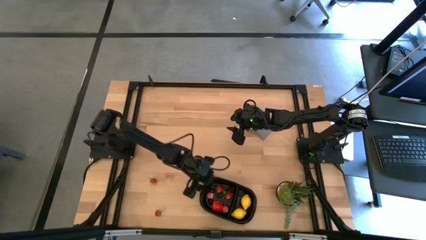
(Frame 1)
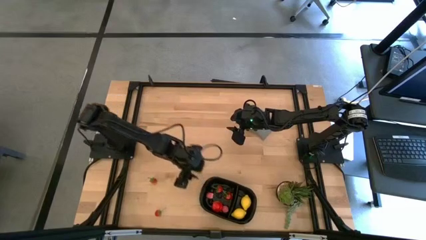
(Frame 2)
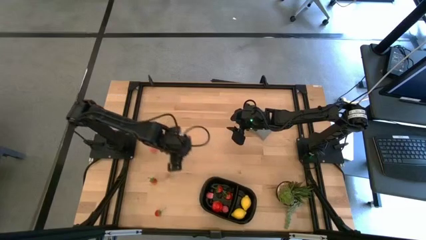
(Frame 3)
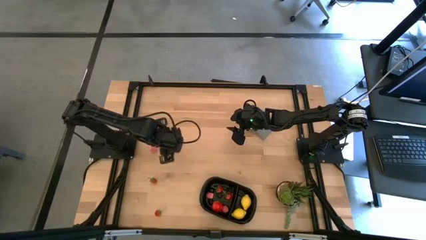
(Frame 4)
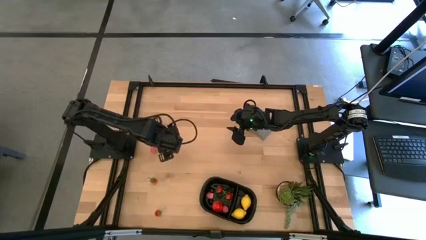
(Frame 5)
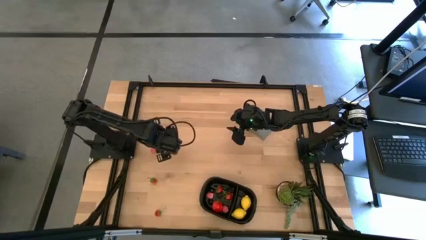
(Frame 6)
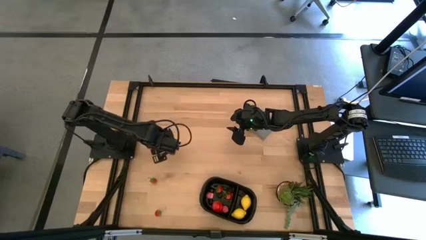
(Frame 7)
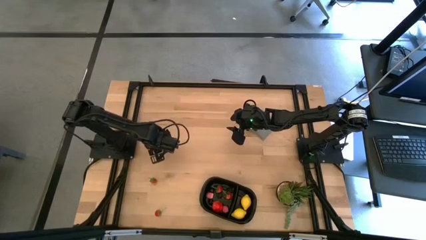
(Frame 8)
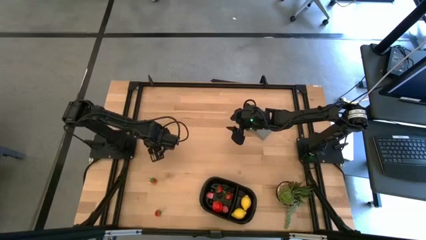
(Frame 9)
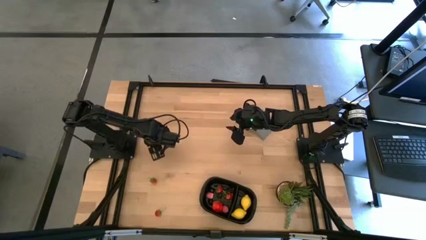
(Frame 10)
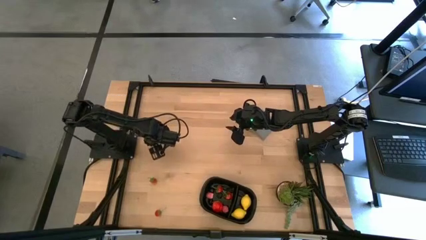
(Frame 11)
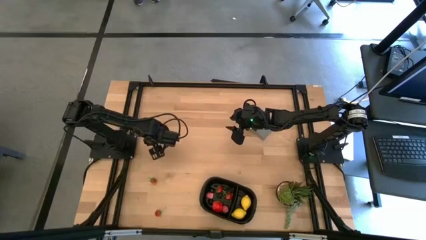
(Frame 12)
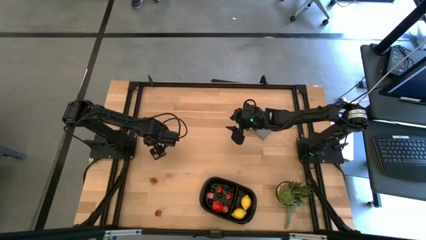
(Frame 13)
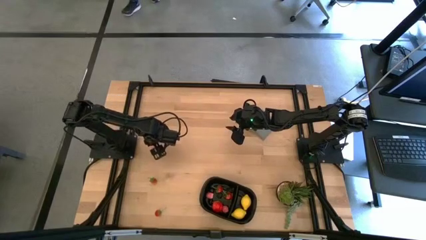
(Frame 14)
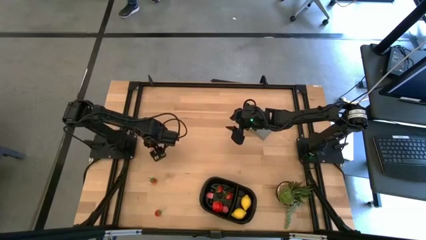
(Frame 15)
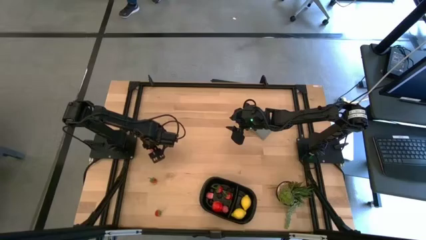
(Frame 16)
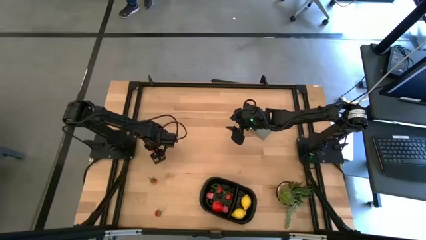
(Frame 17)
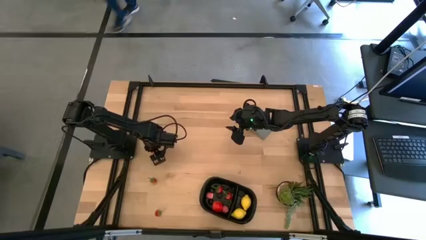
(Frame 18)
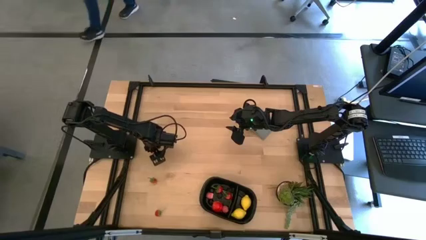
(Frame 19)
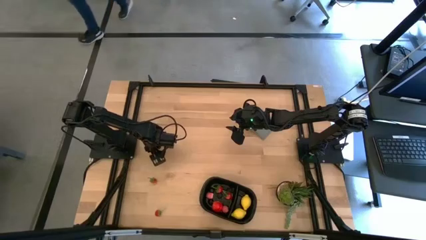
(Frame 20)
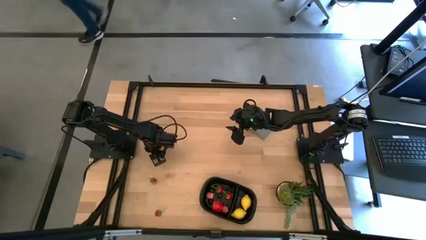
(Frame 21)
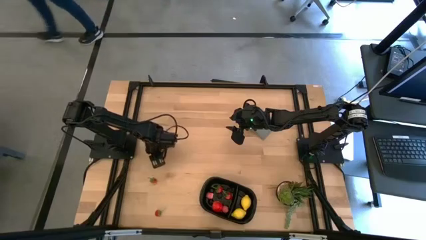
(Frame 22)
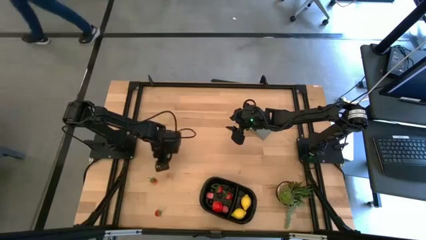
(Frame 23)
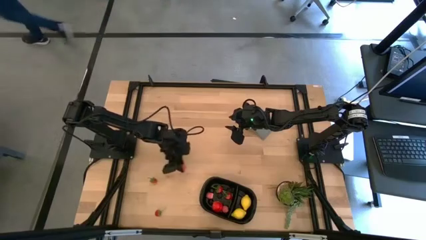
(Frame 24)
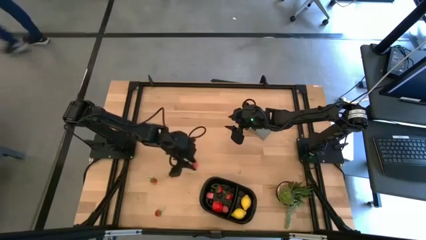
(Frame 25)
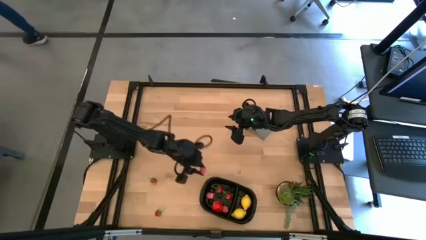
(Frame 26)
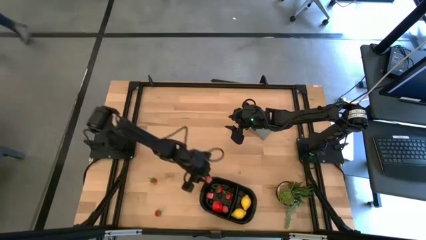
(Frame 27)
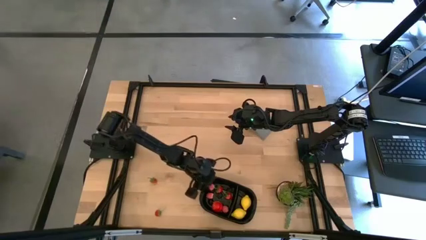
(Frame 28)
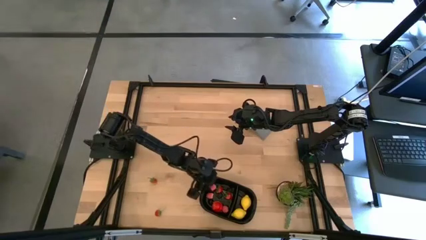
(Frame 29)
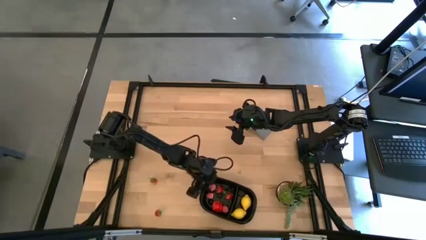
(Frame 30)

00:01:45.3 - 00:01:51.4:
Task: Pick and placing Produce into tupperware
Put the peach into the black bin

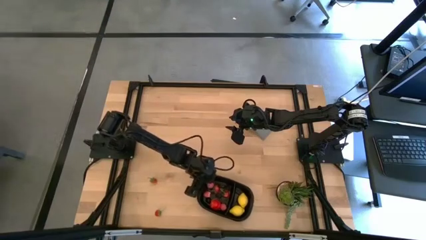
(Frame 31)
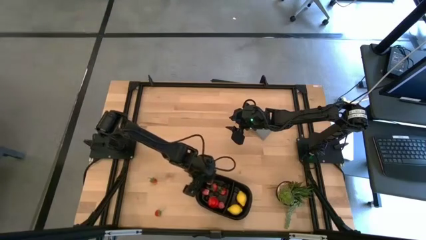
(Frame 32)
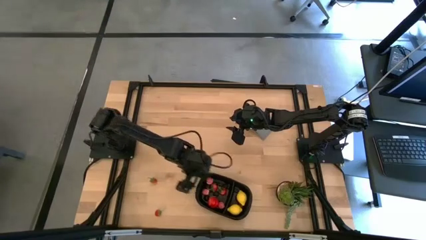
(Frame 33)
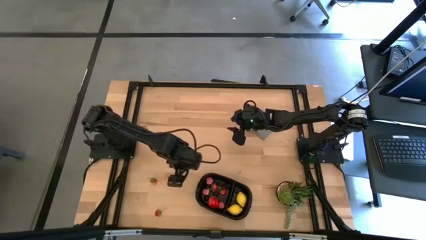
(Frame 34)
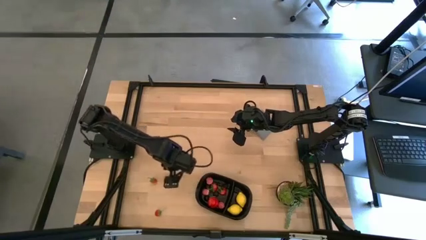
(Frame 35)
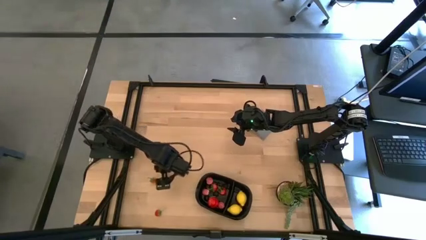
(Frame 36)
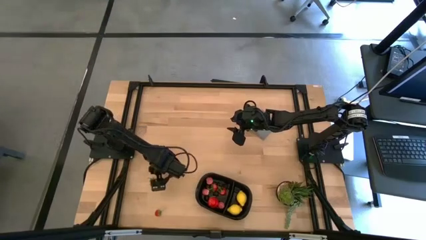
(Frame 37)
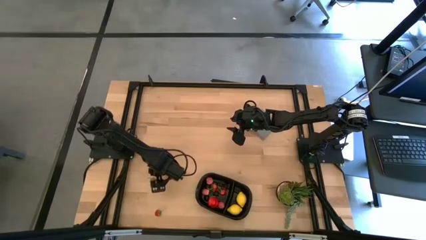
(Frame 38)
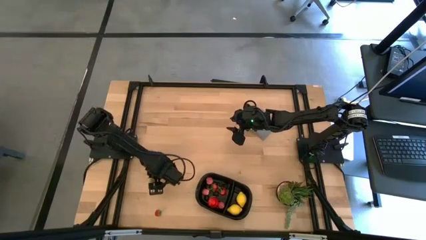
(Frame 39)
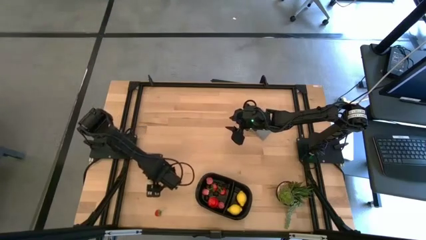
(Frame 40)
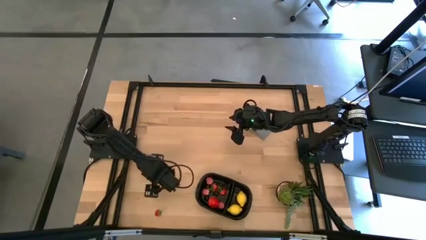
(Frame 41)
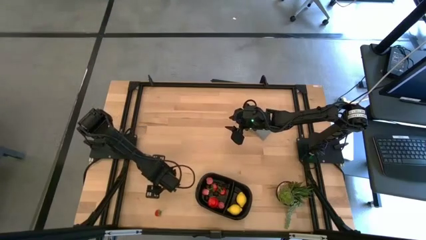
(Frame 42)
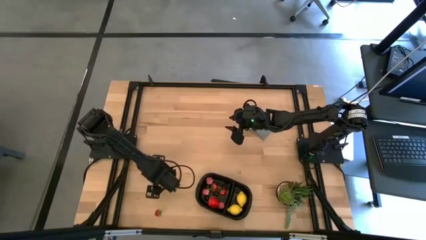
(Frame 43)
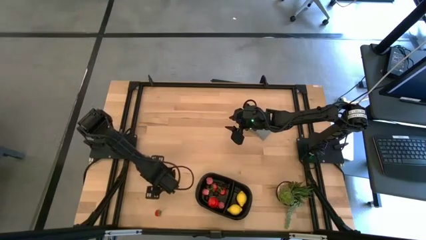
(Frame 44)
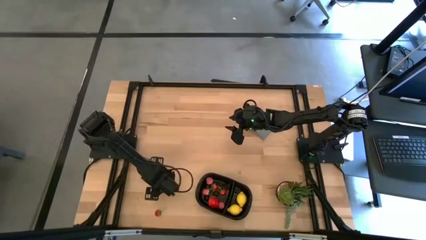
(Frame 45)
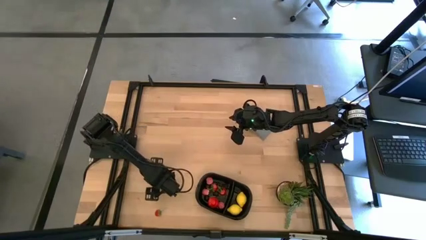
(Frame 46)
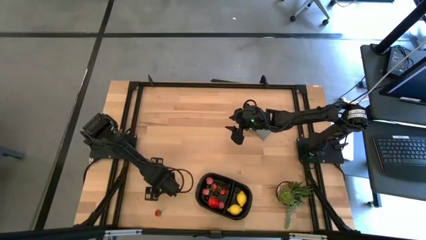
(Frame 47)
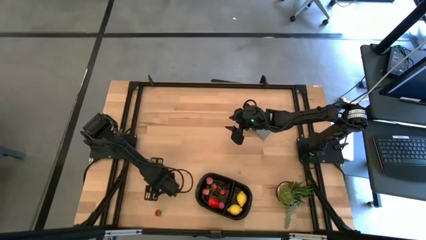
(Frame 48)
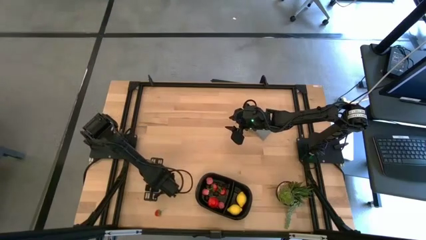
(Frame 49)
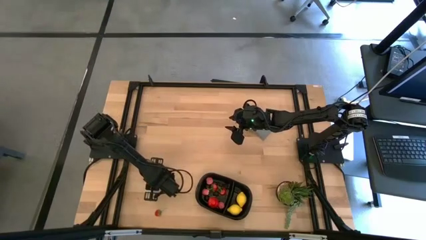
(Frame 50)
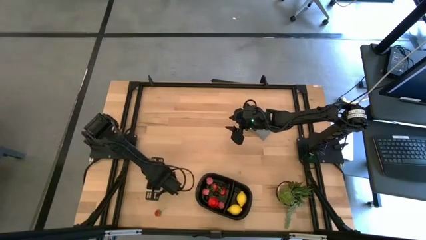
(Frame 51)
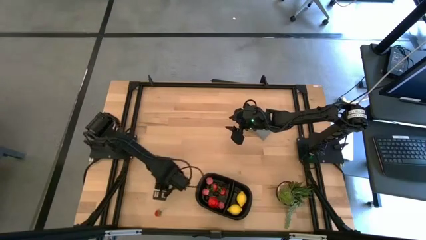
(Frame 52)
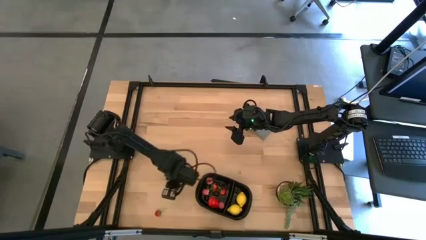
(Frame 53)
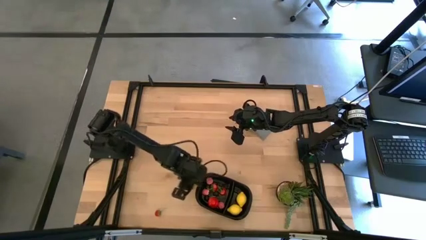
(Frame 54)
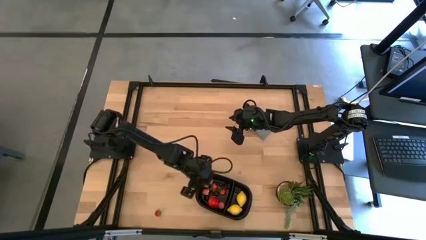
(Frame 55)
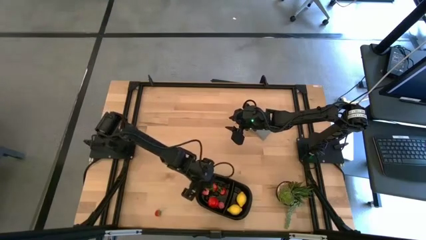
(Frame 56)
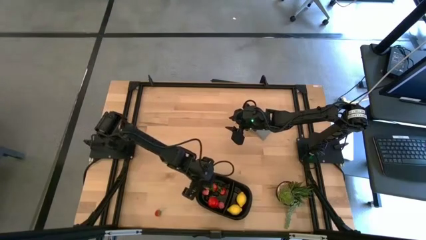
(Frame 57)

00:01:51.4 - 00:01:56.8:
Put the strawberry into the black bin

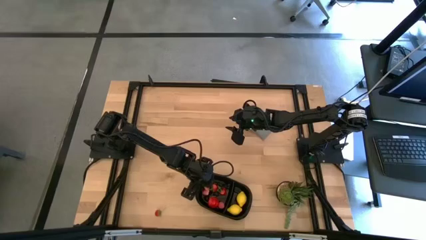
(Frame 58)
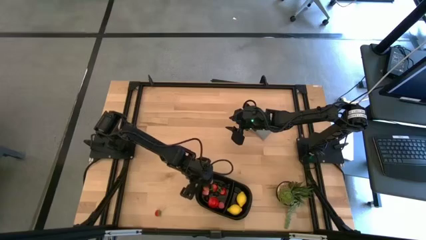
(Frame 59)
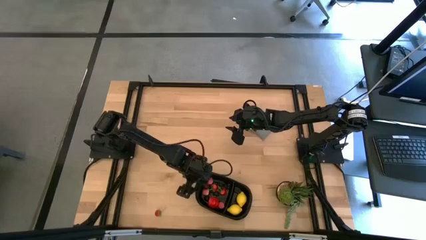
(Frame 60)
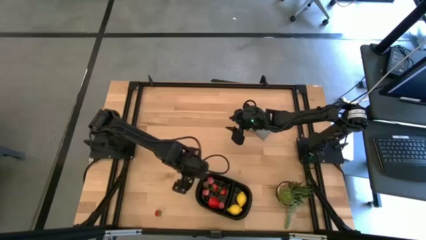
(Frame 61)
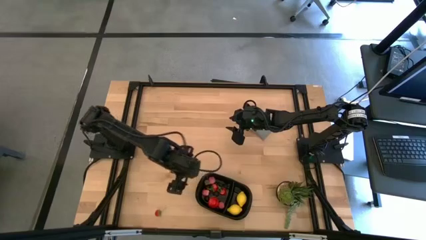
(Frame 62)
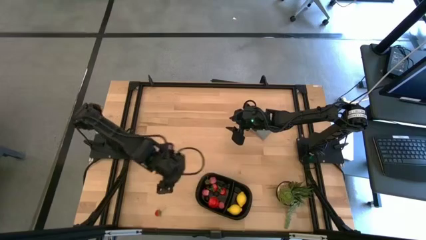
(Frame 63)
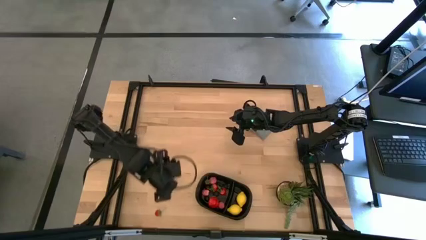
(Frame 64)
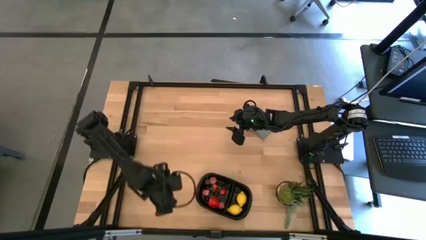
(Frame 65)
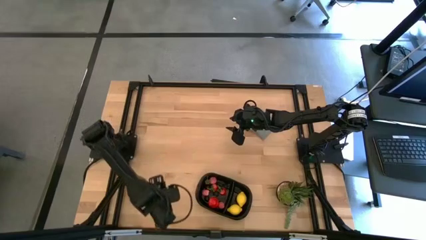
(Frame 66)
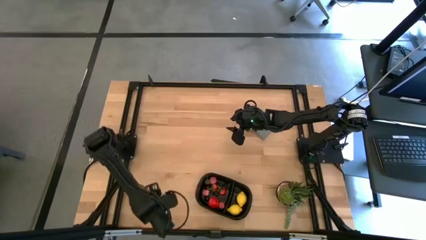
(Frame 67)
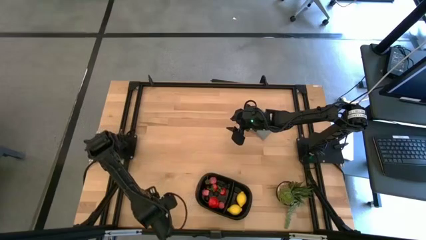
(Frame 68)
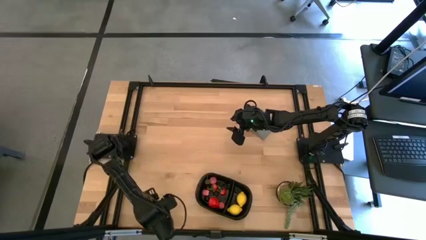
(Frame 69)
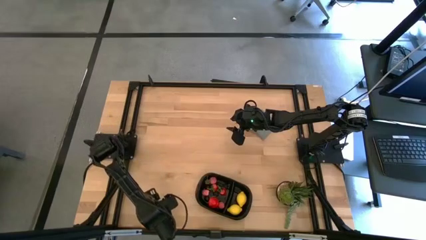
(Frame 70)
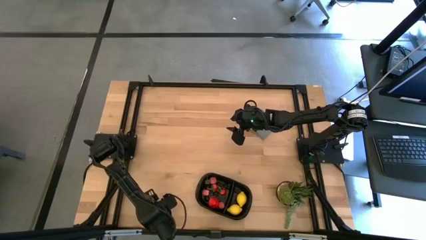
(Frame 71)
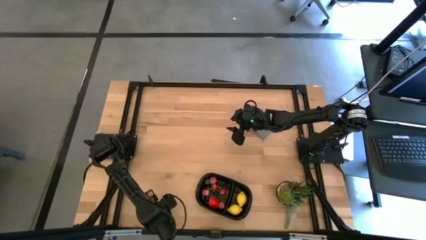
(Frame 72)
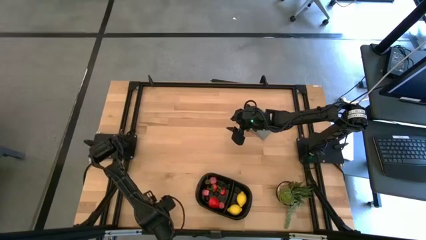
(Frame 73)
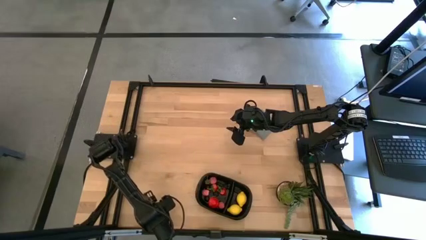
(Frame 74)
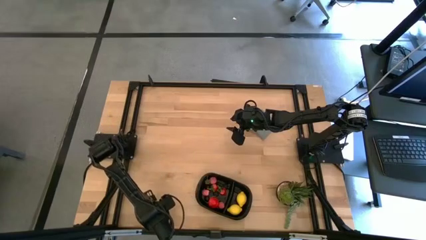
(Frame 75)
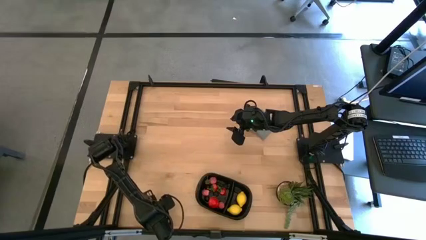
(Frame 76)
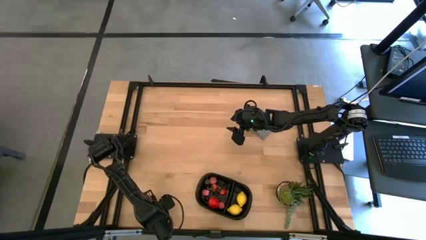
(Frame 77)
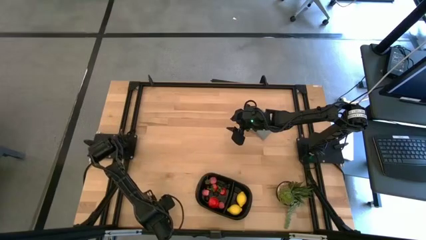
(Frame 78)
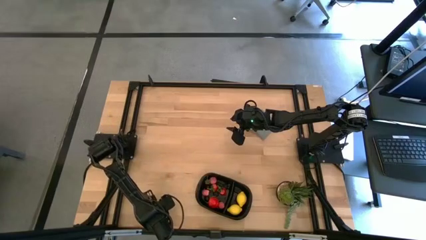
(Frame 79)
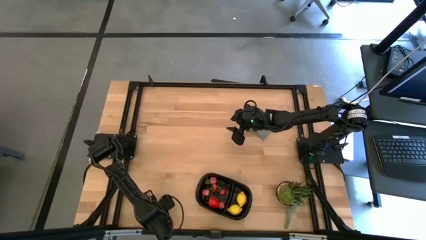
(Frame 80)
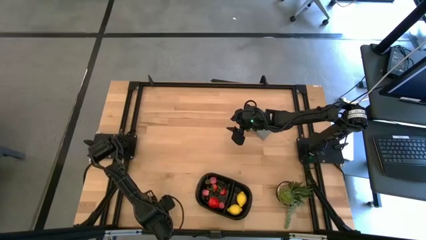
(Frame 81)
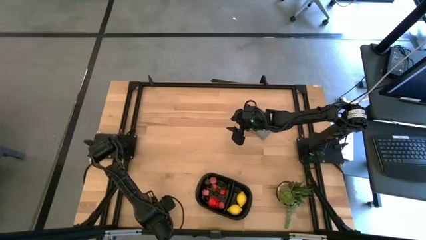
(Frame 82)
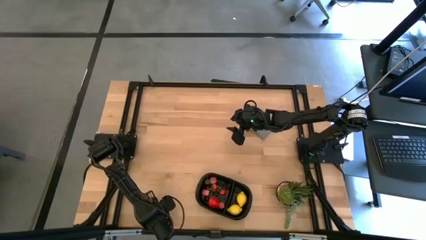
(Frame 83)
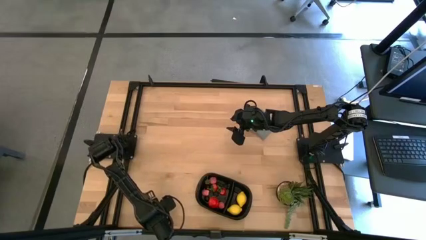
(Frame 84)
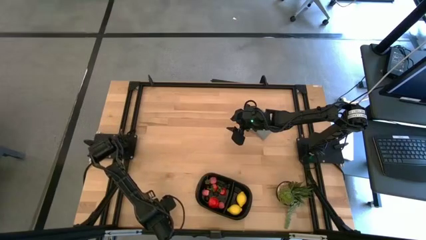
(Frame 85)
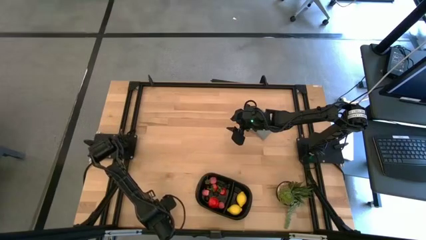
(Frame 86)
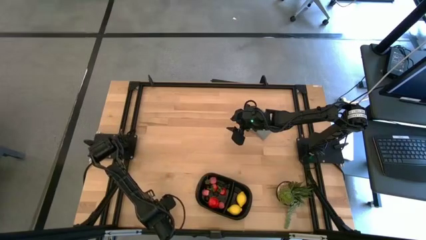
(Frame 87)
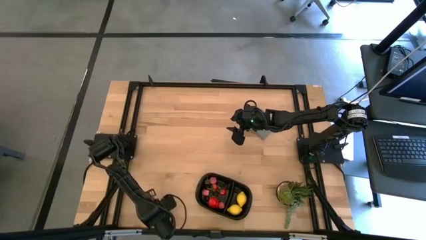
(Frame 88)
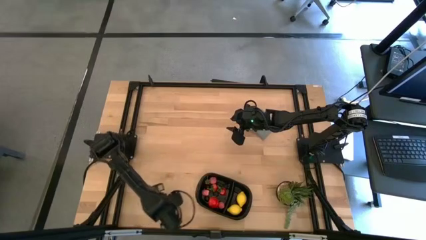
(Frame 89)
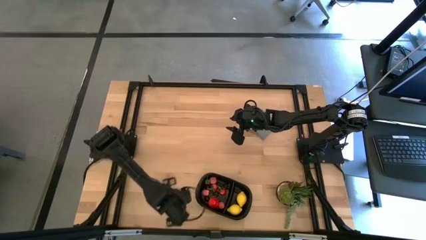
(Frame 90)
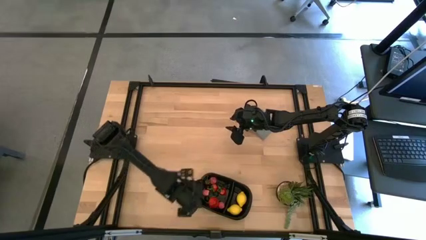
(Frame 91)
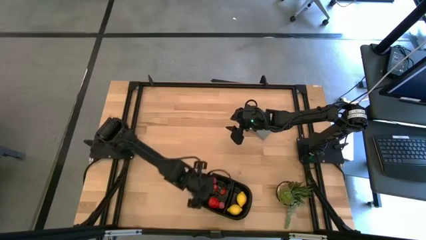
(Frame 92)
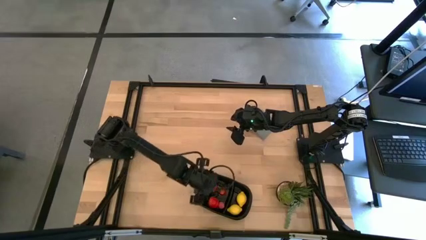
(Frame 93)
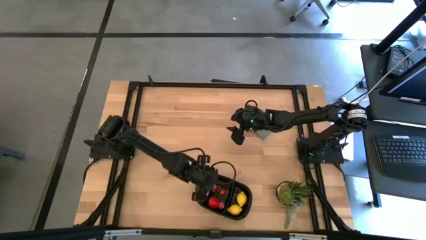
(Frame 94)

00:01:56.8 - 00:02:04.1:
Put the strawberry into the black bin
